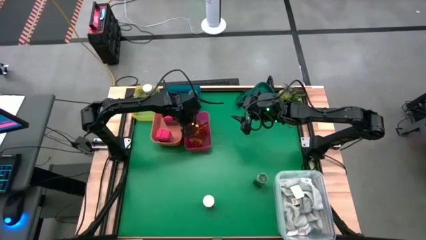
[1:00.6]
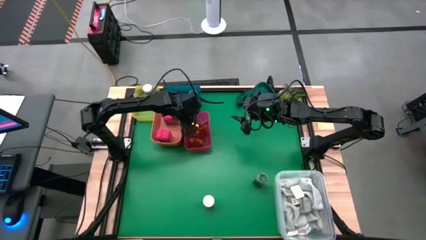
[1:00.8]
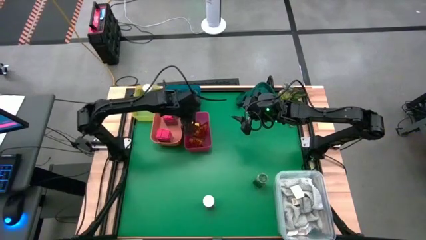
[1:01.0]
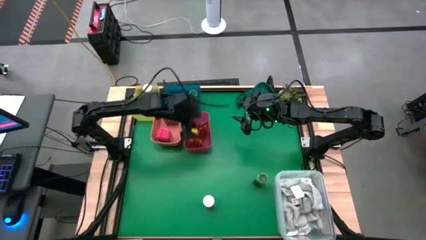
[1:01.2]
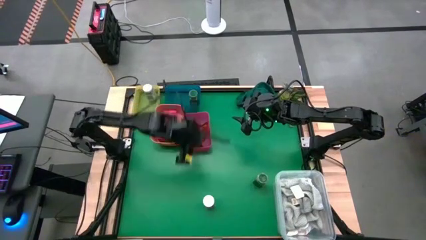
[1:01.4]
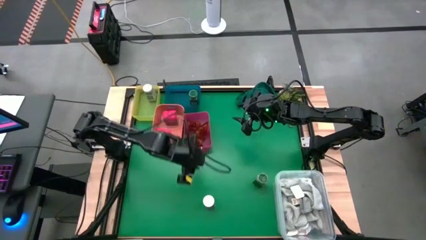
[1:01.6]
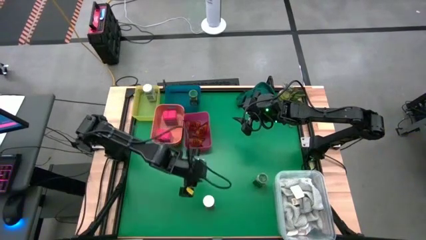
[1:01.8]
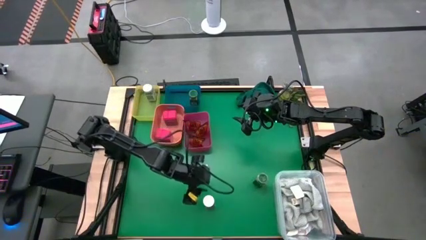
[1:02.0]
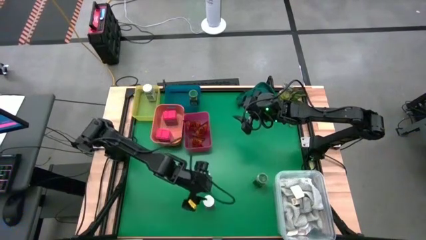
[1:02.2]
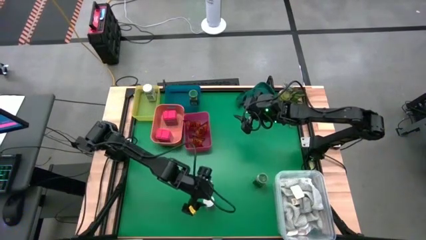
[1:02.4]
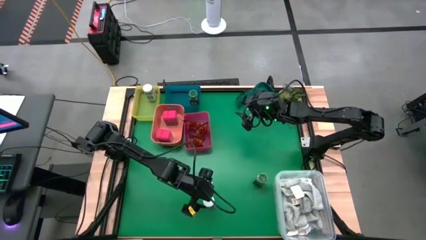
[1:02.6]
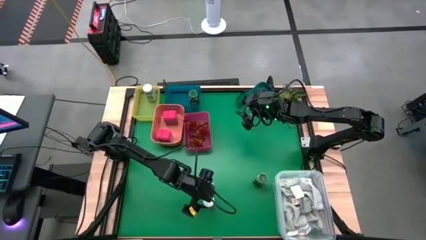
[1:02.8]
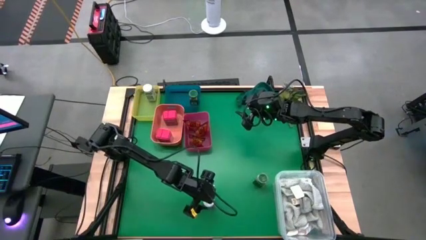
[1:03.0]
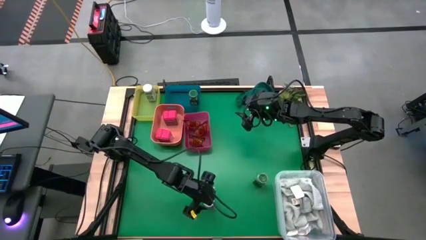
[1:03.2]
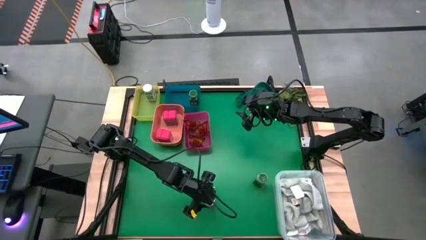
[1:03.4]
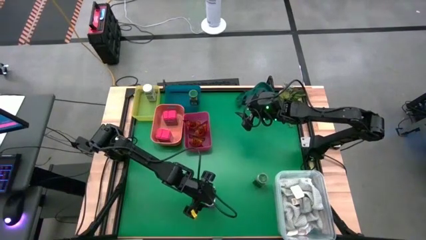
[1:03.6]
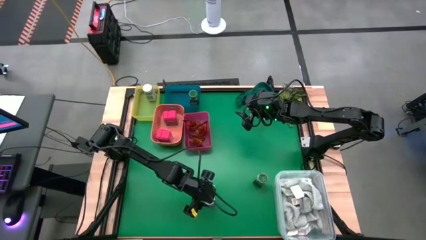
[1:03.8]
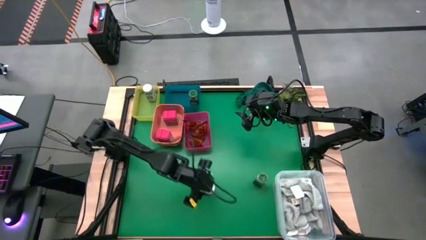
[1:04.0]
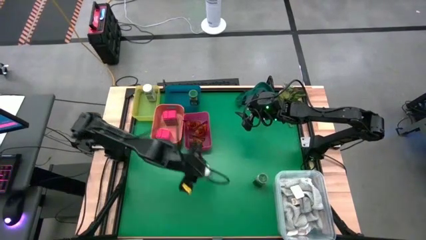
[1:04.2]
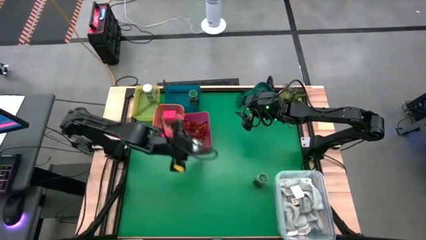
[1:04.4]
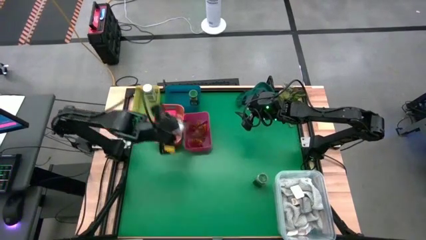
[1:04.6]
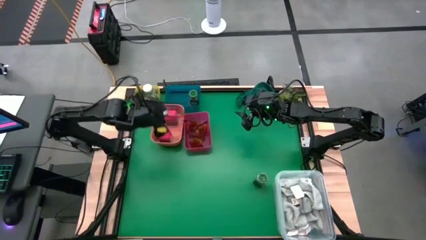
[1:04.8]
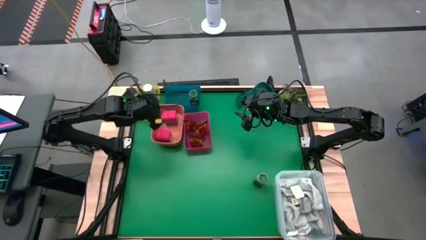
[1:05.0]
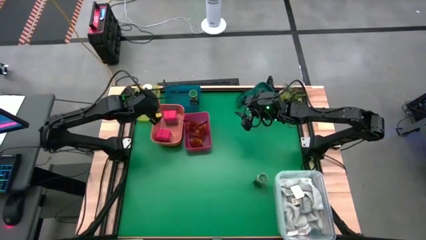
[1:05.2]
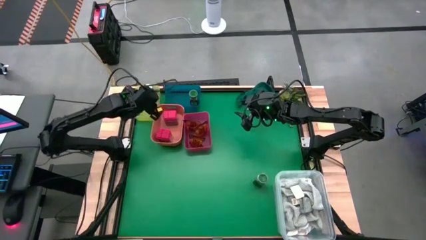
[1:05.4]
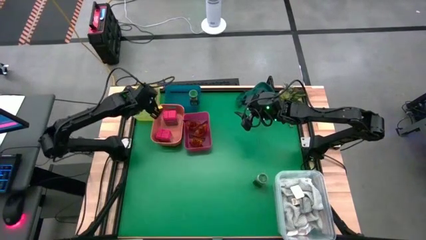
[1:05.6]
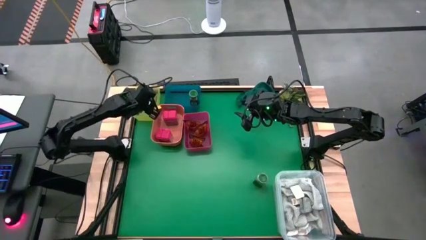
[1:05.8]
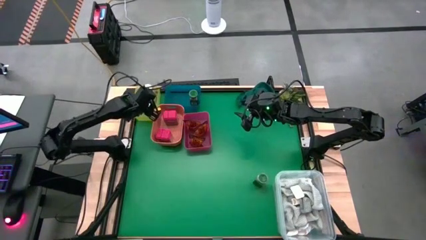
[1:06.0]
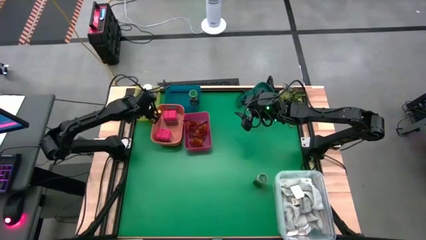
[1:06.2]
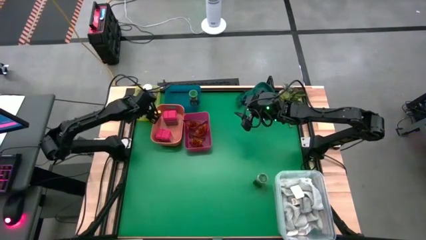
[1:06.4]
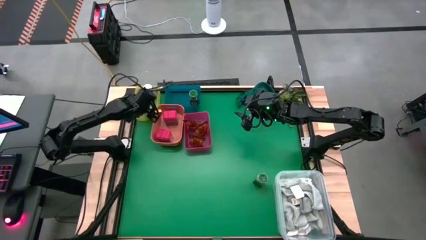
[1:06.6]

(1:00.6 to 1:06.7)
Task: Sort spices by type
Put the white seasoning bottle into the yellow bin

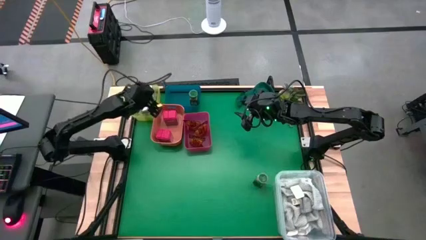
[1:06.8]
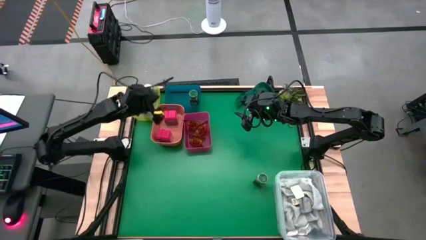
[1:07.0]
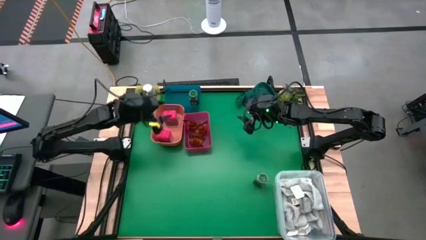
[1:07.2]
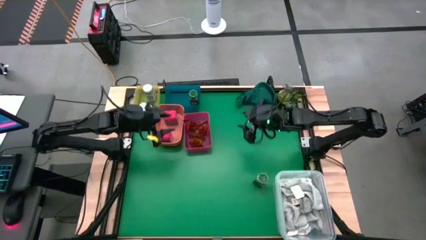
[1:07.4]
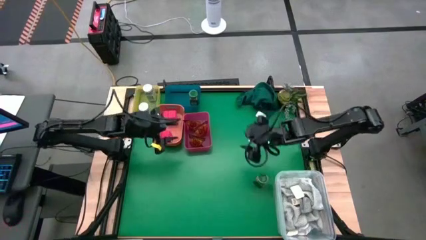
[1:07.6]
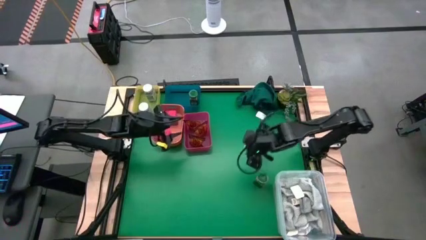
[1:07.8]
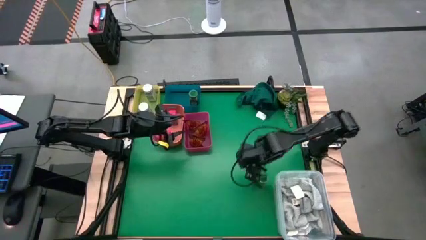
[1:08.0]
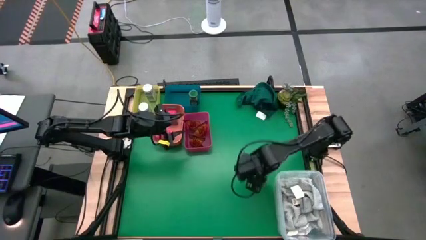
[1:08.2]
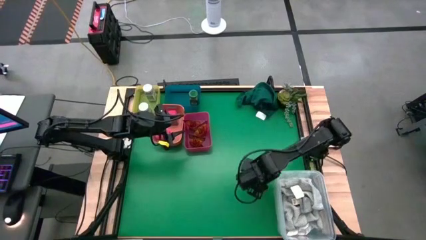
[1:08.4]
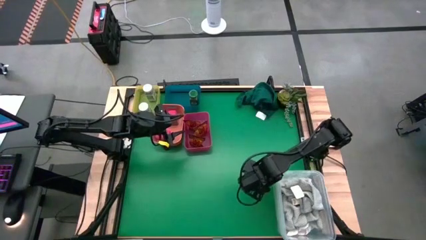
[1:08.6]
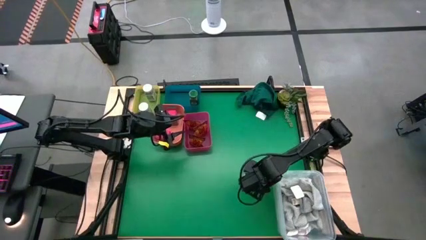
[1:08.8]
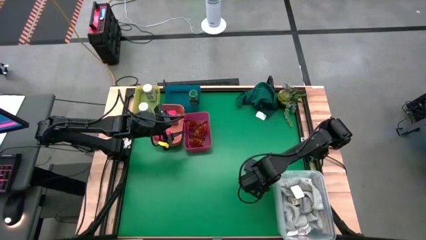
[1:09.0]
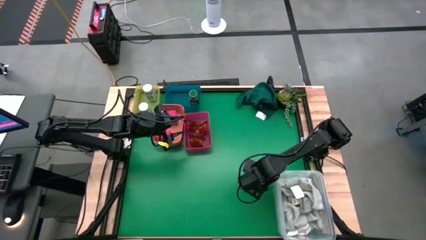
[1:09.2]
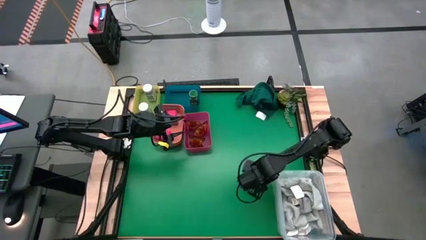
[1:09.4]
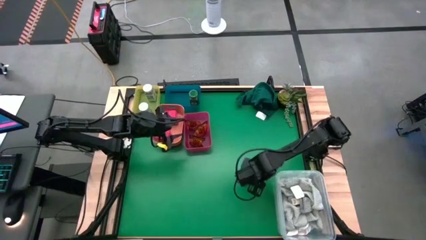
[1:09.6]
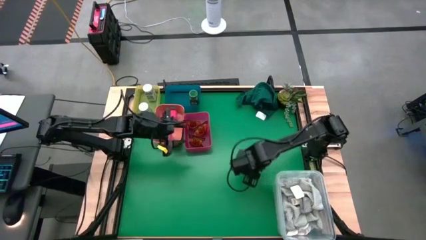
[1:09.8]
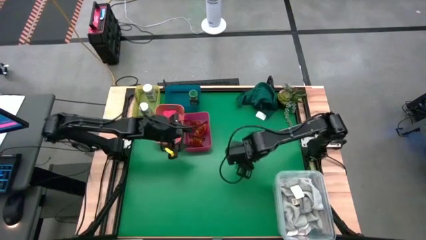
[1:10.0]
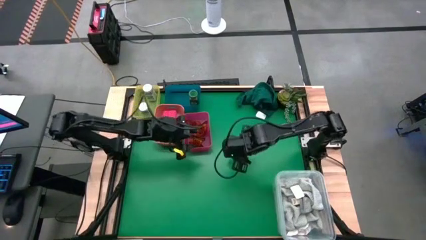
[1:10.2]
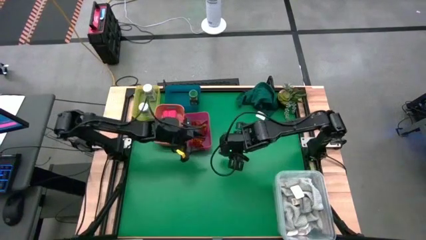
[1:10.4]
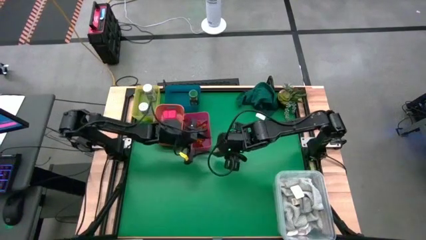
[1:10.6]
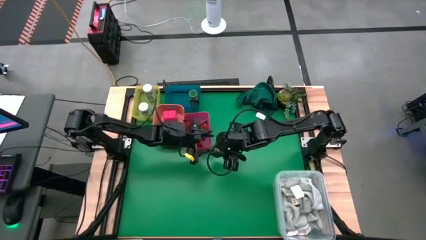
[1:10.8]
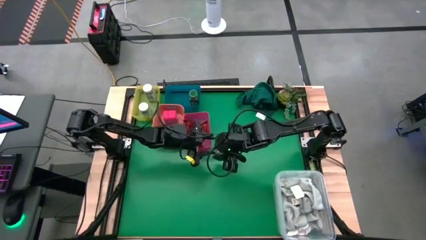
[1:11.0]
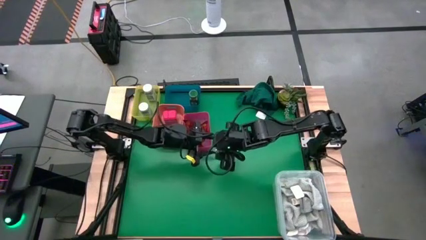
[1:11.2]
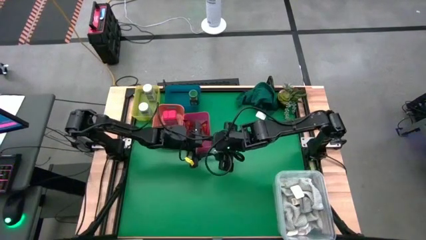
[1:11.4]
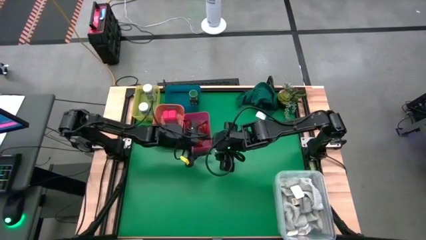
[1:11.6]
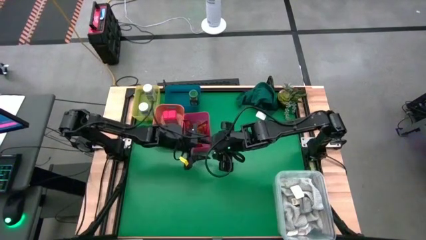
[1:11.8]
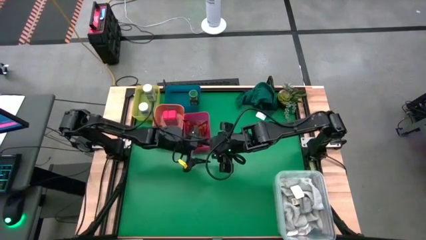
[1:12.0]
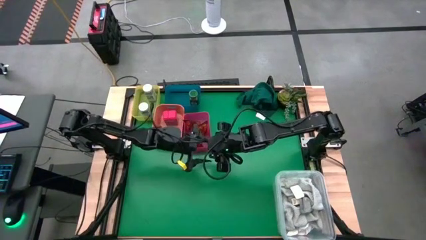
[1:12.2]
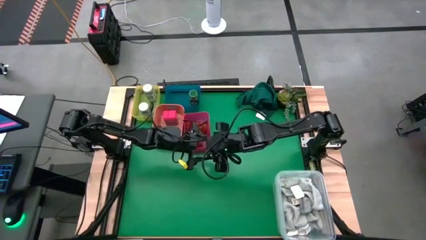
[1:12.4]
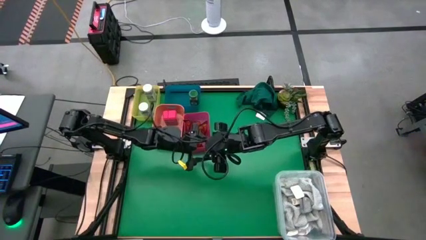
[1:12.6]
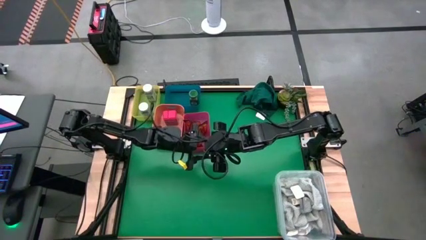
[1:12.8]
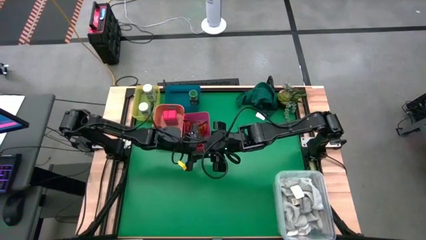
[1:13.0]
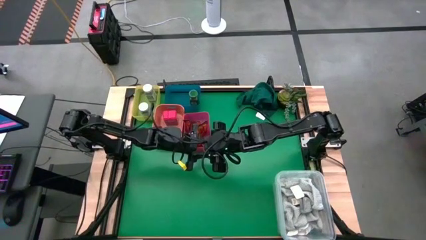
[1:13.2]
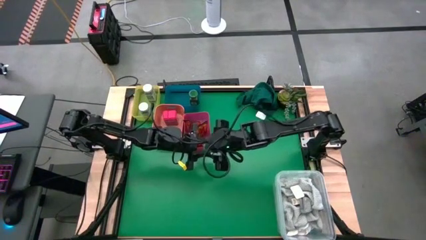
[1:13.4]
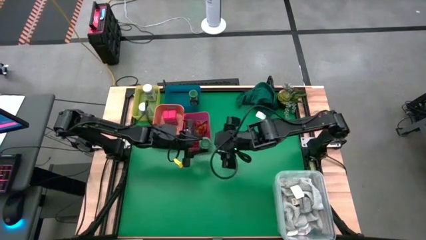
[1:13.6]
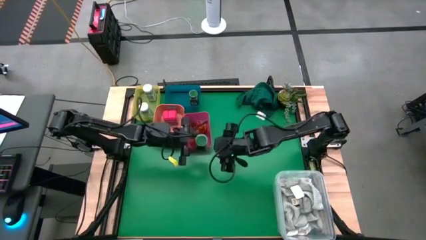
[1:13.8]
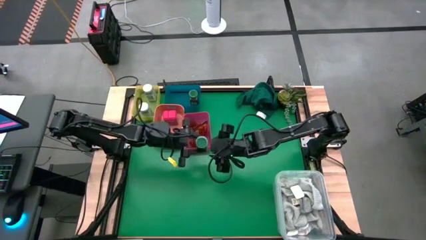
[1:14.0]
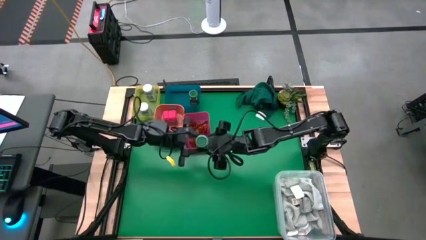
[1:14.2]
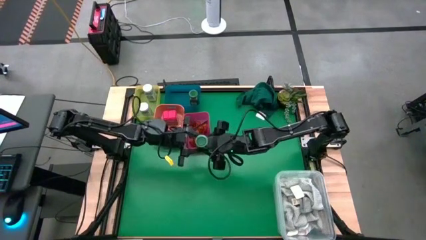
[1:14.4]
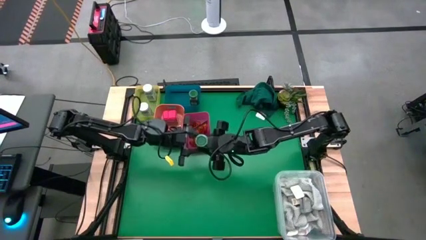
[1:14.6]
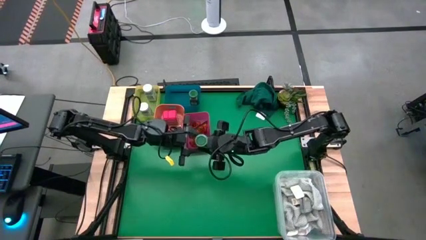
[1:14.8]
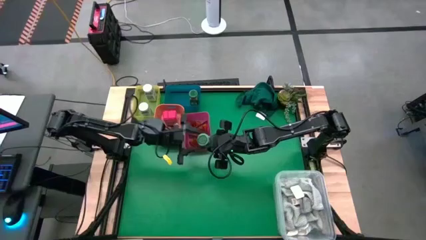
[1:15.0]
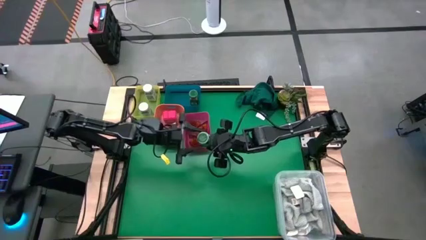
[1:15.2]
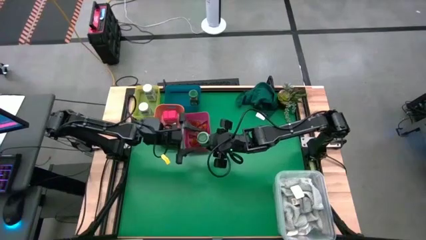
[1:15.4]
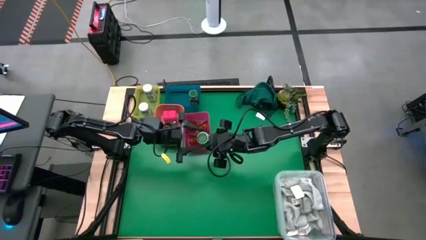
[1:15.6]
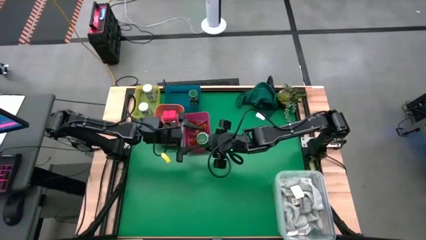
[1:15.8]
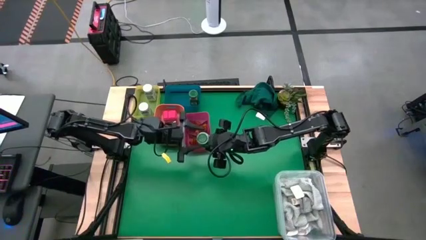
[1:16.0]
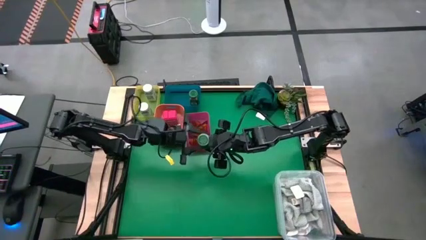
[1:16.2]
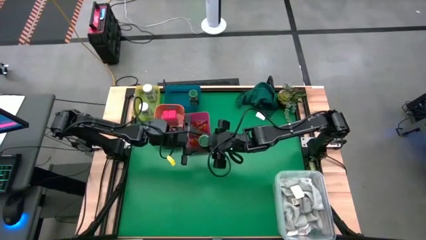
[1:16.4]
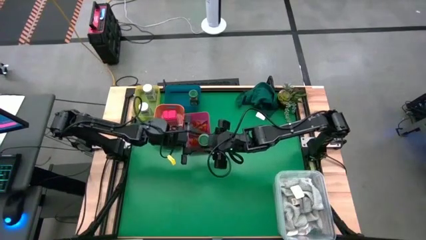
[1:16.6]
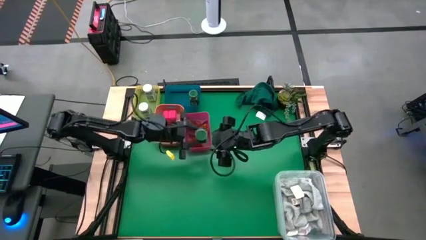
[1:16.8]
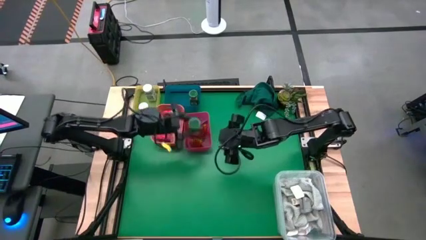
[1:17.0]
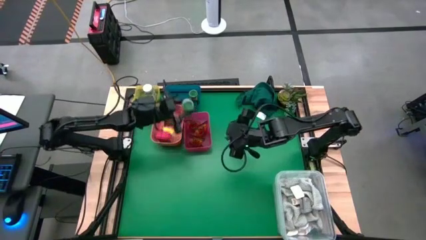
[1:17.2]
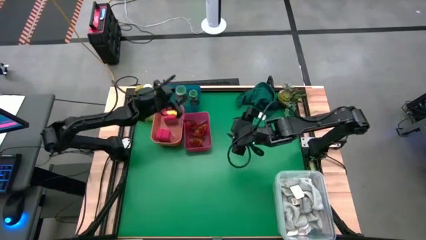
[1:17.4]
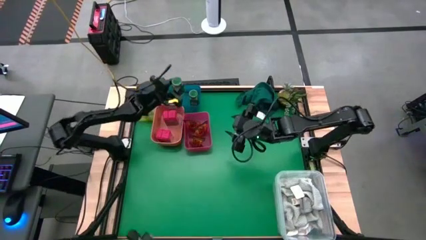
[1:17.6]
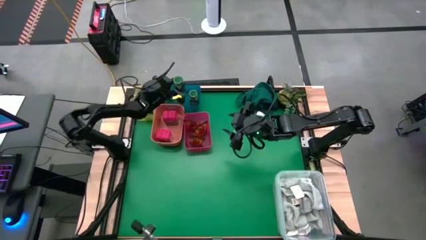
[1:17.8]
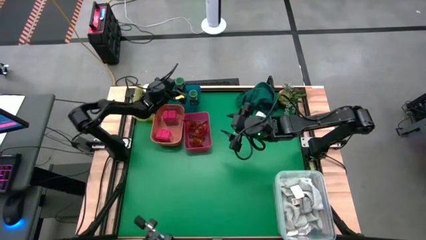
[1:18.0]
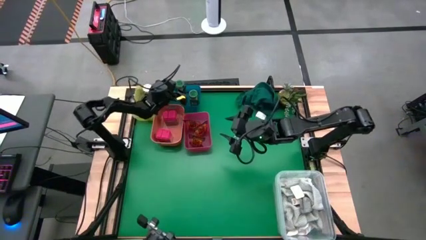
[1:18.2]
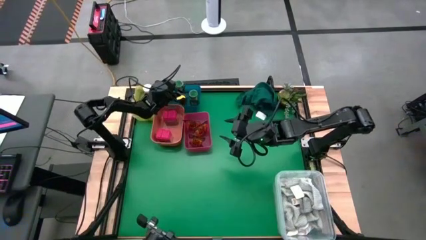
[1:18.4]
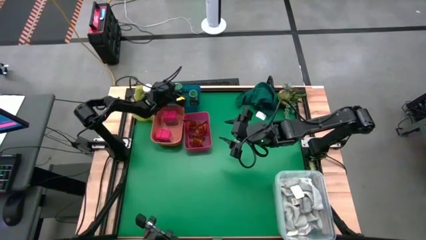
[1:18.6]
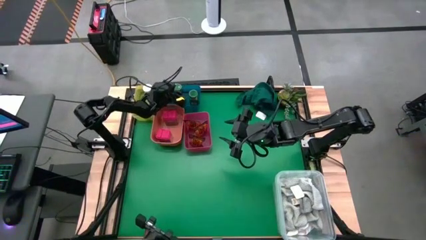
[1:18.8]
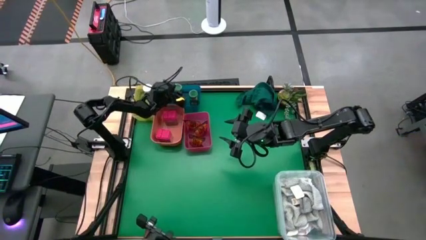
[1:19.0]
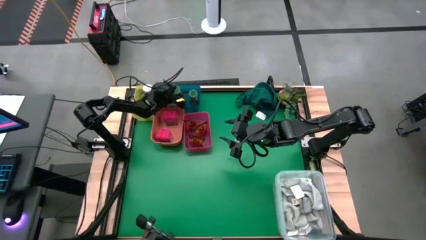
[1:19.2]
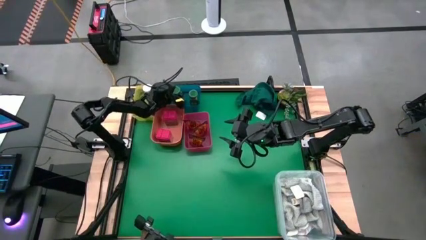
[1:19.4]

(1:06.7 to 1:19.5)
Put the green seasoning bottle into the blue bin
